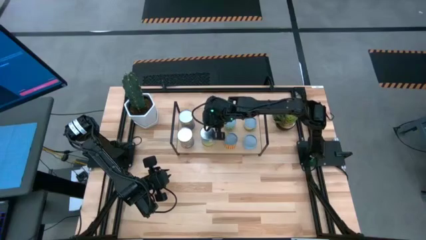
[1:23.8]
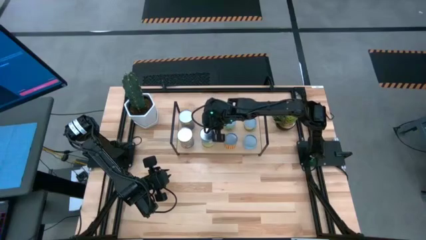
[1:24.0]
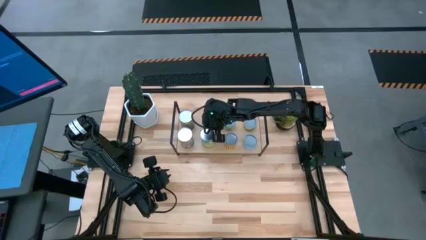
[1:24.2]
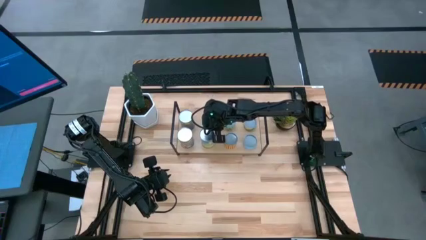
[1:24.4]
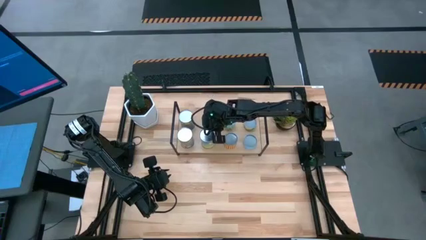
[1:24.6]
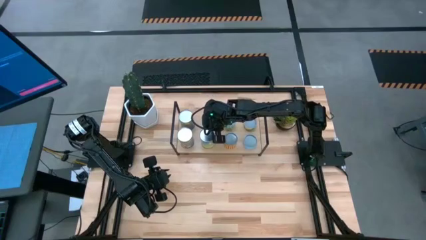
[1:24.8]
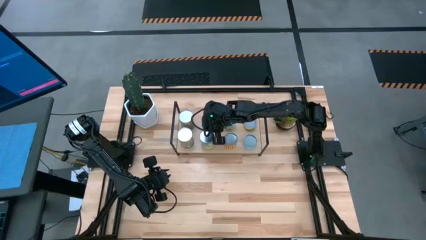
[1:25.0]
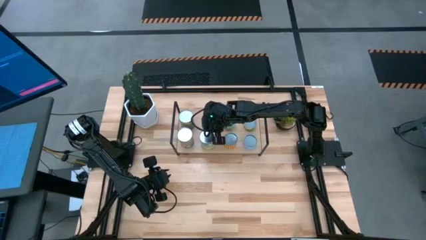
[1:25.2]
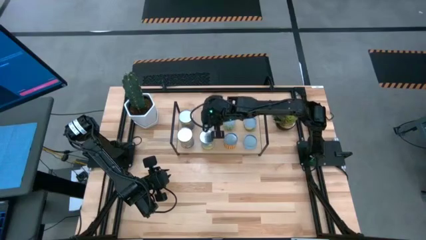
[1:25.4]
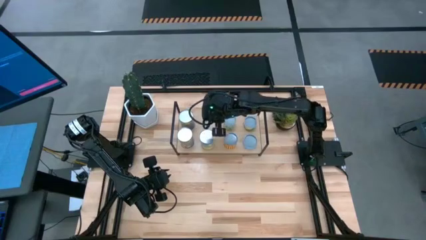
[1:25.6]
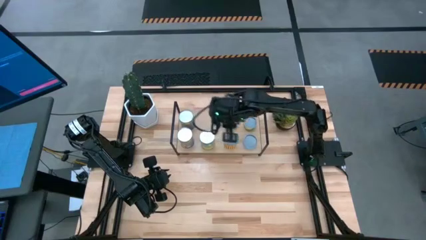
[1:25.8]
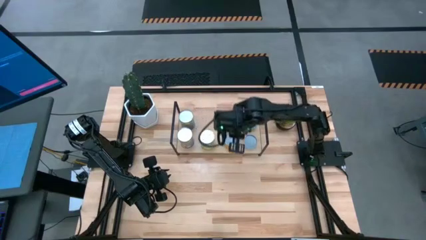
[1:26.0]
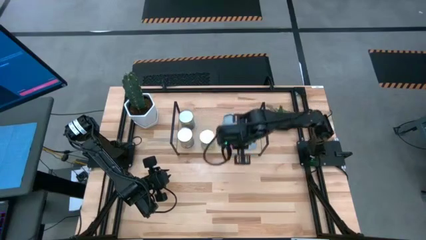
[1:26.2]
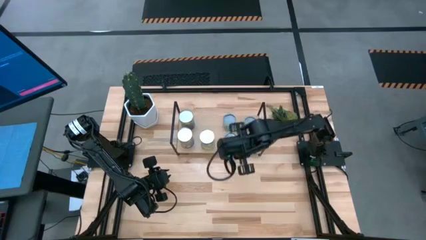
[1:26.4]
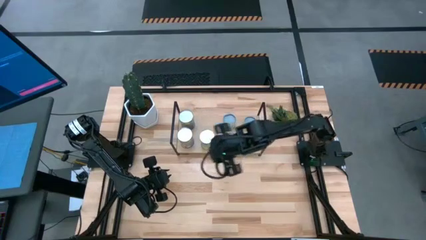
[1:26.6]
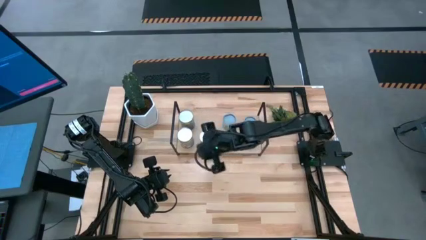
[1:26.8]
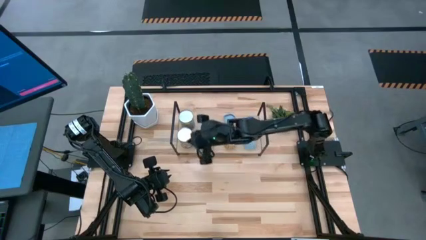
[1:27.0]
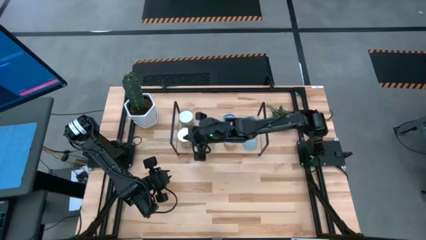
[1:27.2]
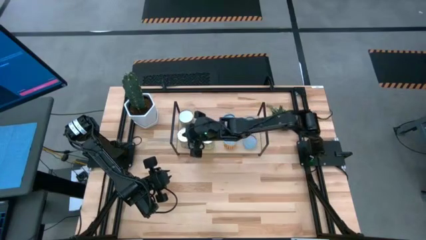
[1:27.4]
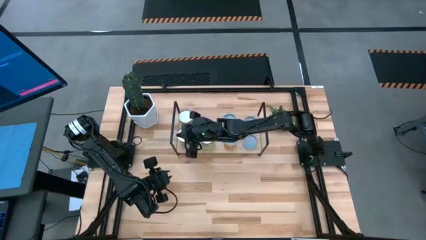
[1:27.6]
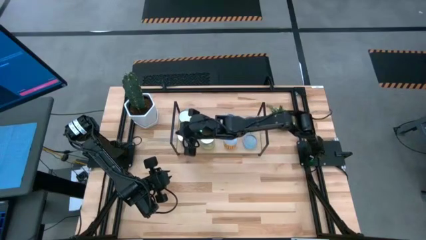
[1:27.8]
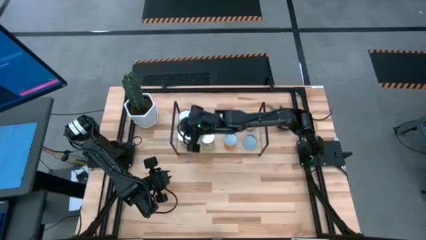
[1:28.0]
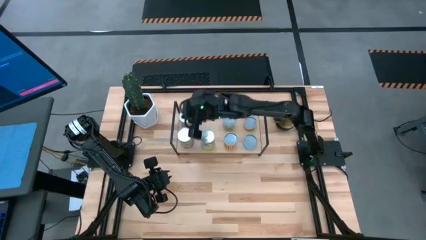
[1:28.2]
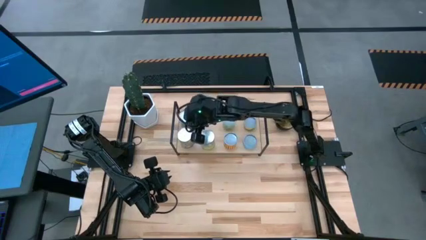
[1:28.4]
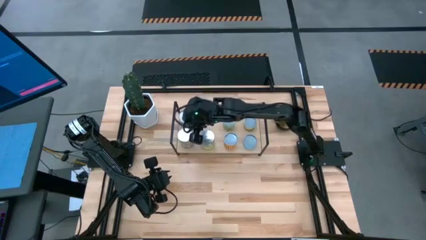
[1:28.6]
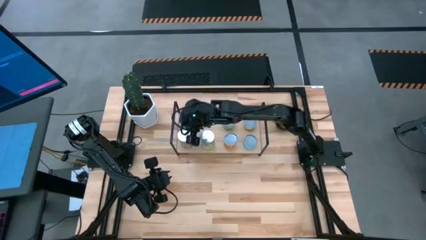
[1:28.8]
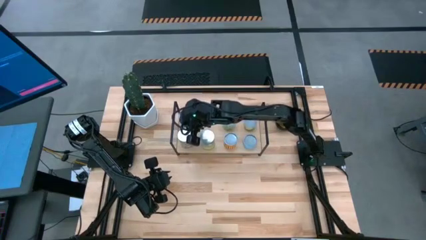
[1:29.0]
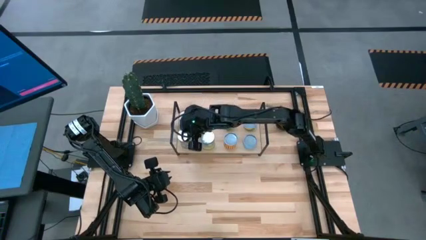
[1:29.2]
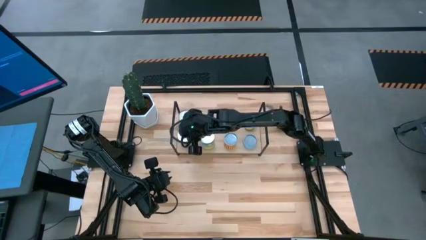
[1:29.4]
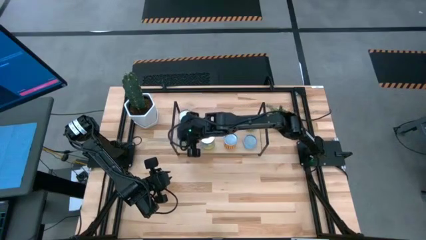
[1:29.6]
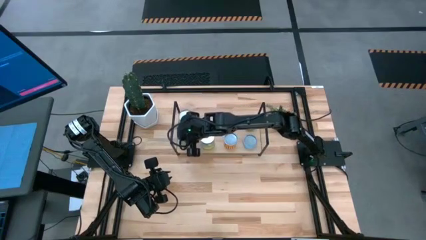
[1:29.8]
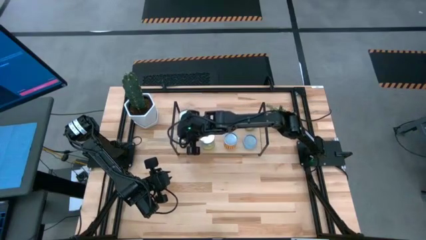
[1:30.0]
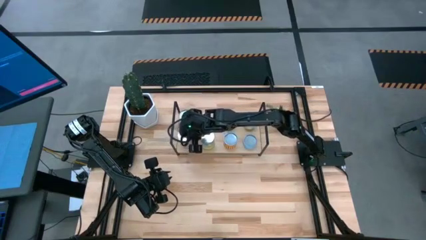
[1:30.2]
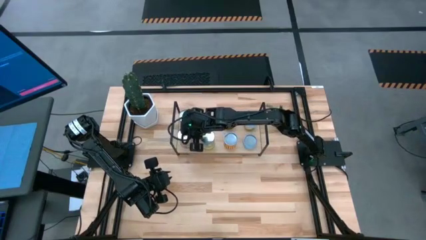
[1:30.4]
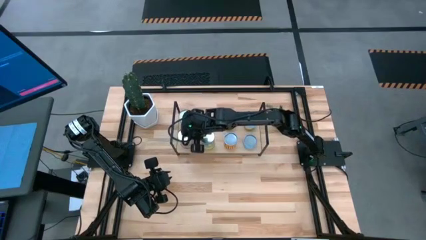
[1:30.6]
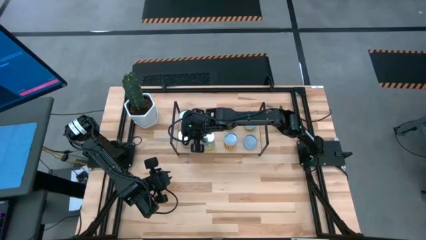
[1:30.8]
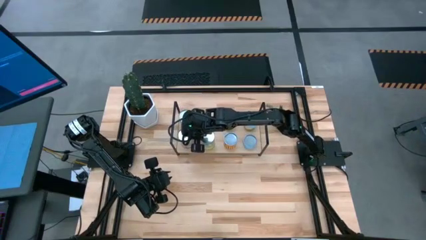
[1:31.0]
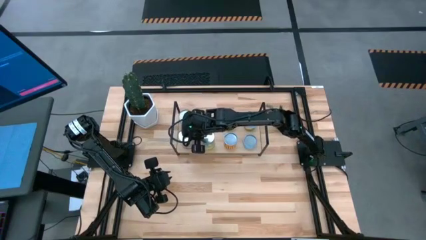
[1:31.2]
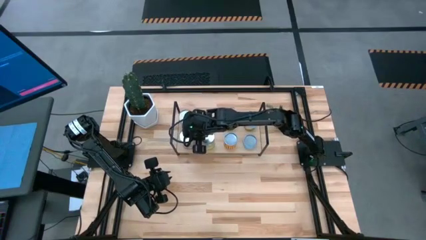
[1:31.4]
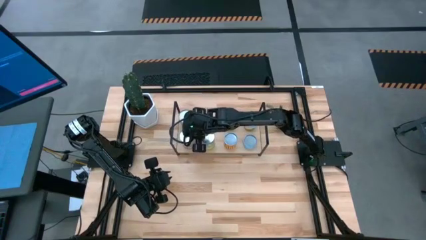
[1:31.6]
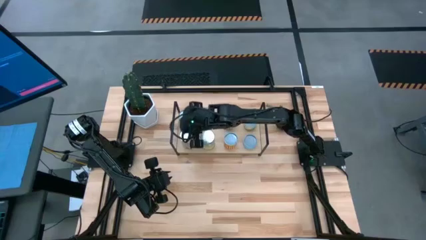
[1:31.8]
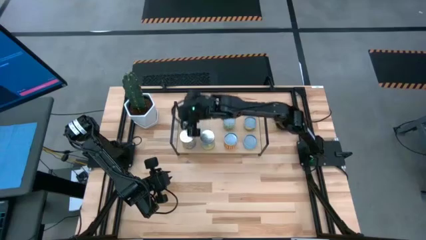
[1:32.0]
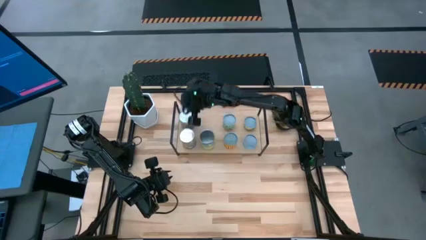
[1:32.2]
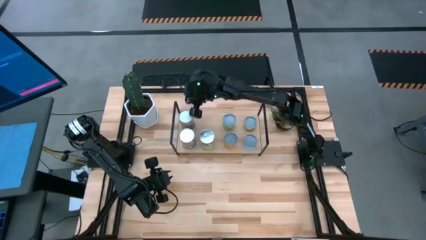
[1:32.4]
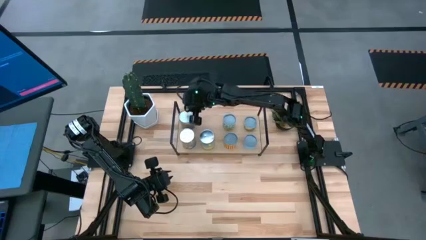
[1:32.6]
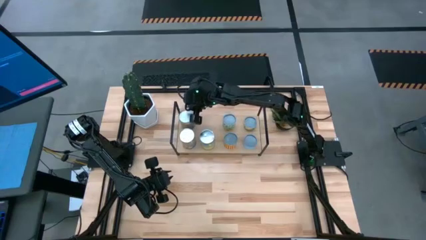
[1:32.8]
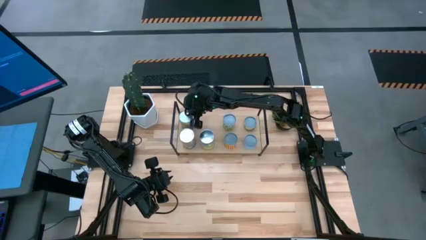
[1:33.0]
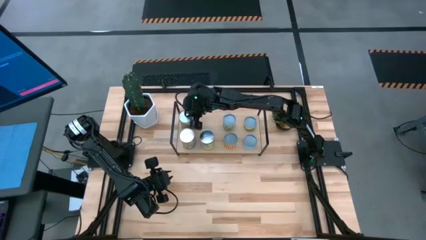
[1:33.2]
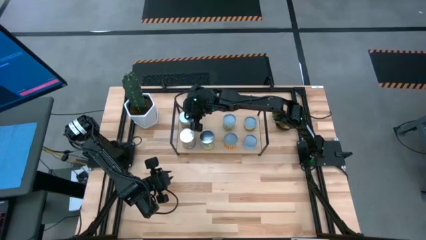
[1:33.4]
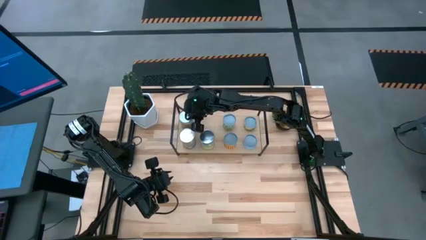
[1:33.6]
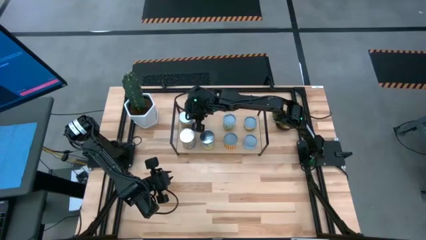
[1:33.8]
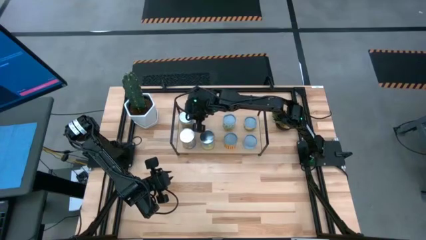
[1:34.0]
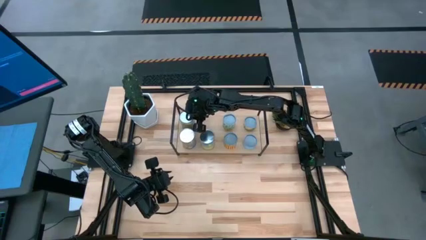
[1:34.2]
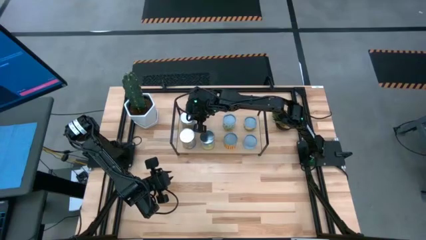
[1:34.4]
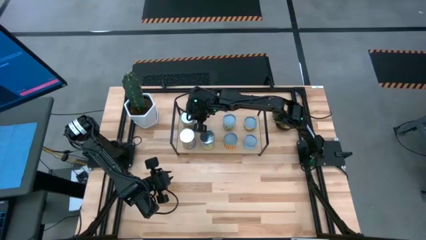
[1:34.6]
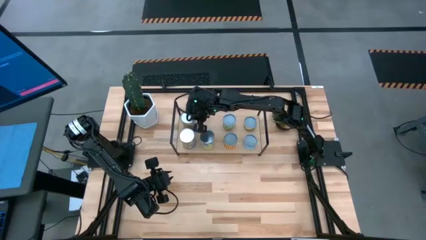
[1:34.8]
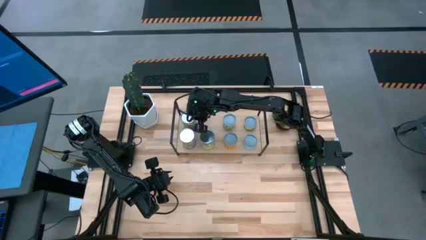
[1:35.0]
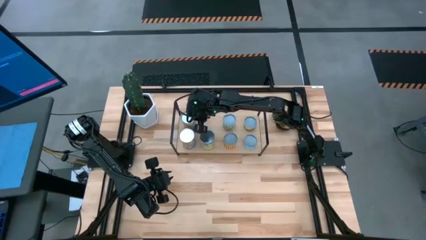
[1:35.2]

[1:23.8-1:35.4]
Task: Pick and place cans onto a shelf
Adjust the canned goods on the shelf

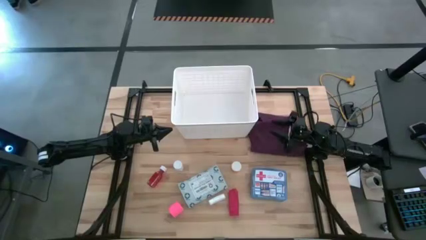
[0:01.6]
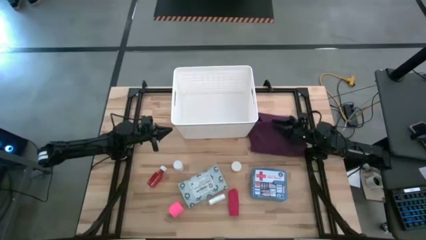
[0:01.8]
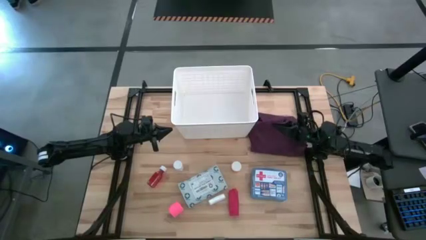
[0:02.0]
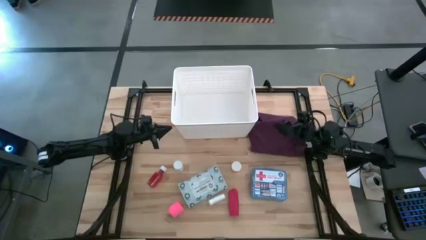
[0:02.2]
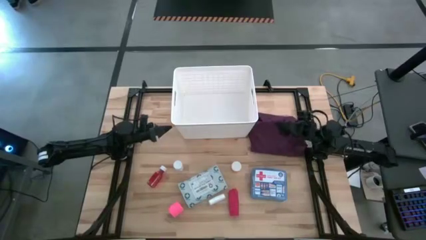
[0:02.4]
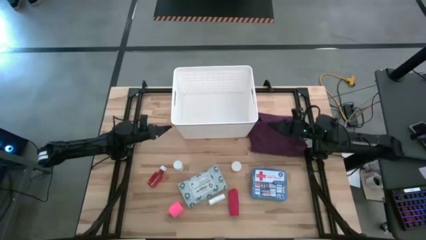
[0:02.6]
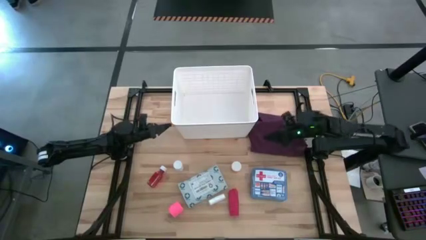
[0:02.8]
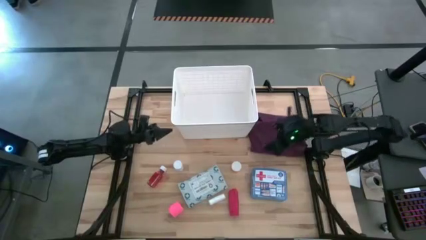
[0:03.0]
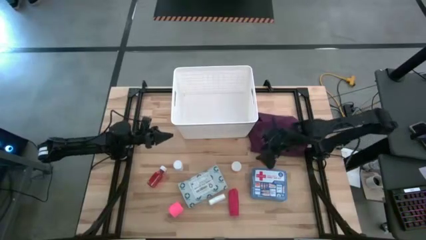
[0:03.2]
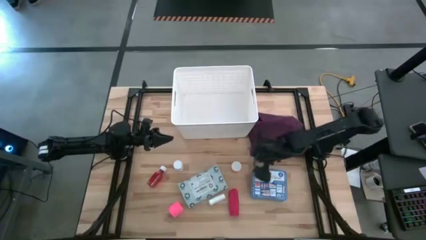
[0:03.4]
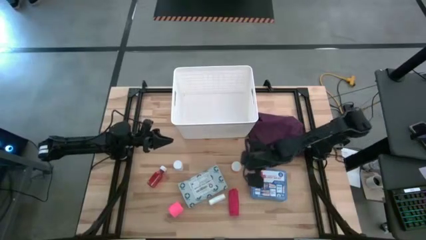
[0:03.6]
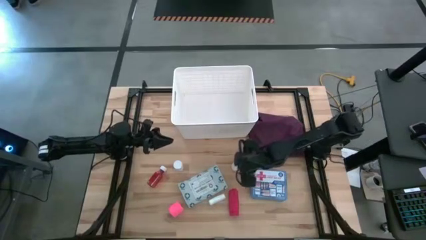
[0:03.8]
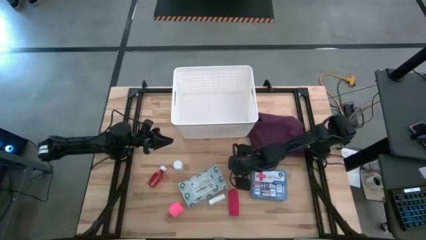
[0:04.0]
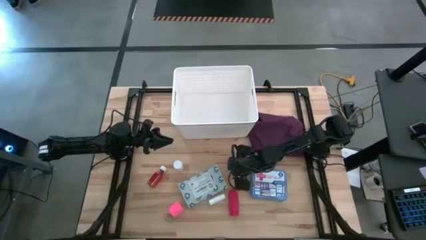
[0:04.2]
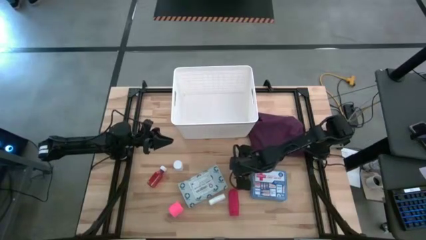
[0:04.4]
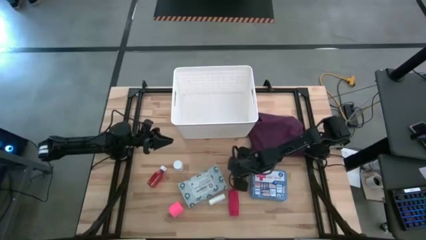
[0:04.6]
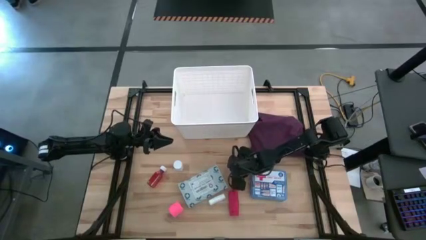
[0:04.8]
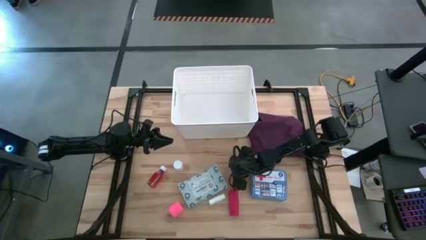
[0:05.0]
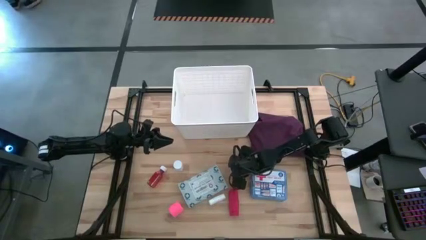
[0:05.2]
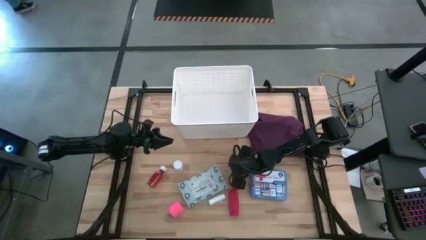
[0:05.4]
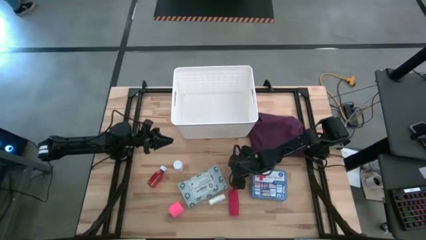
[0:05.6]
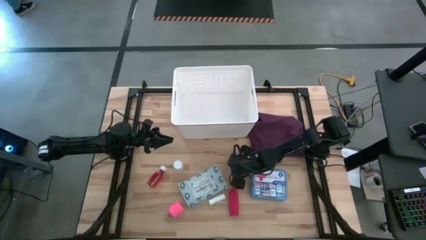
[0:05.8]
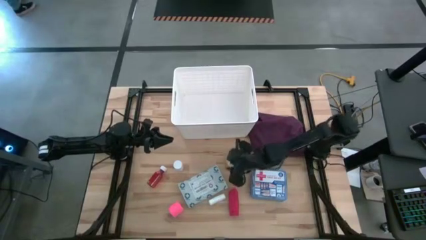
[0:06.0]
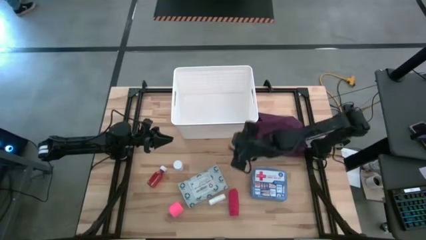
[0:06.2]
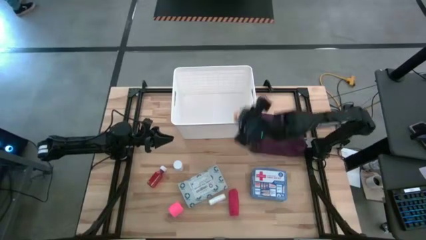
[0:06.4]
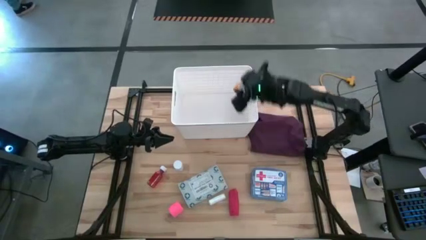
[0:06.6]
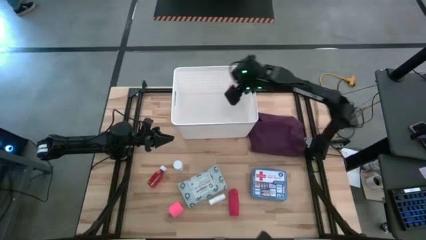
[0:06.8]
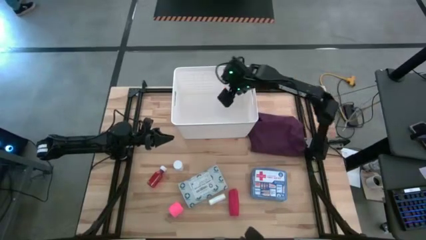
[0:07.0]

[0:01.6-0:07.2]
Task: Pick & place medical supplies in basket/bin
Put the orange pill bottle into the white bin
